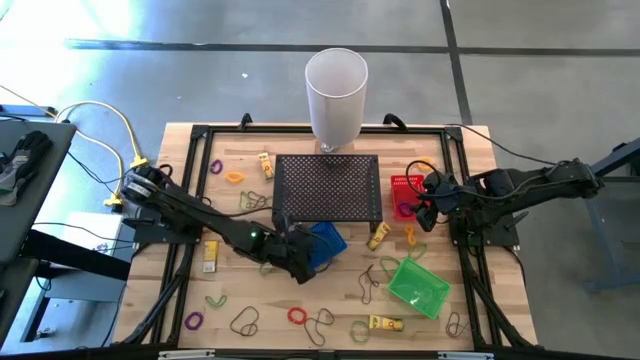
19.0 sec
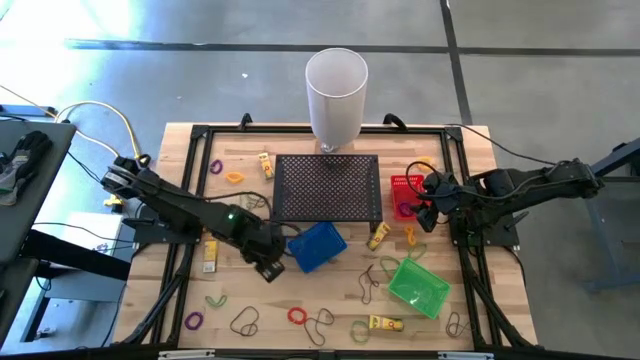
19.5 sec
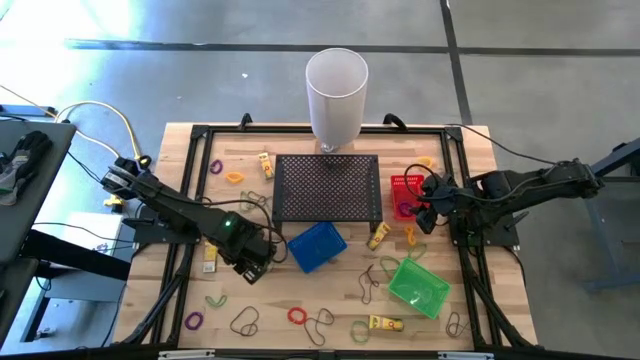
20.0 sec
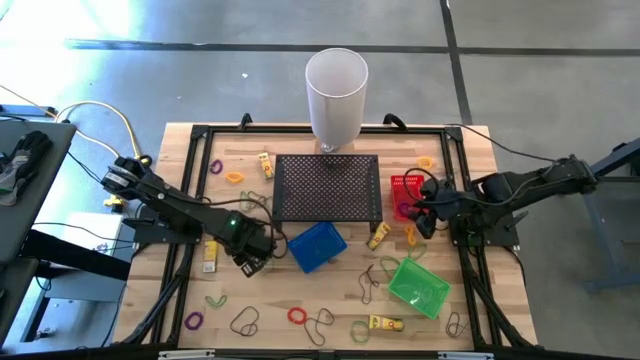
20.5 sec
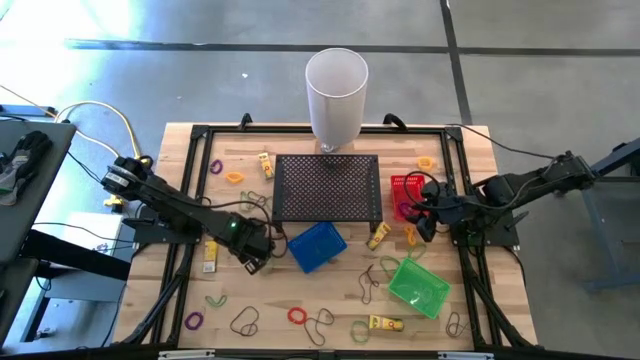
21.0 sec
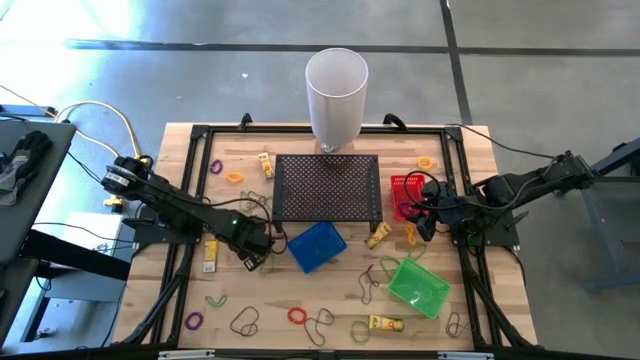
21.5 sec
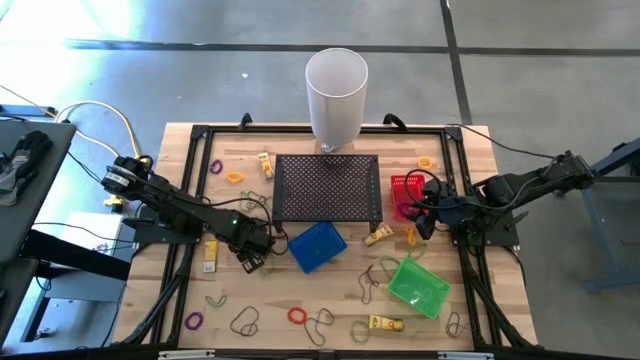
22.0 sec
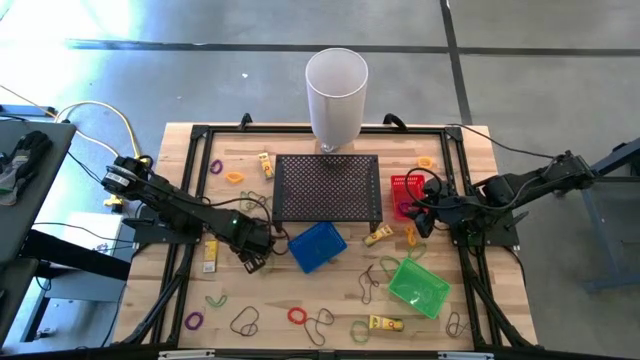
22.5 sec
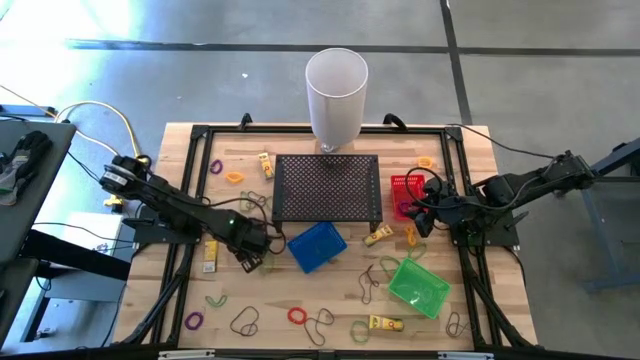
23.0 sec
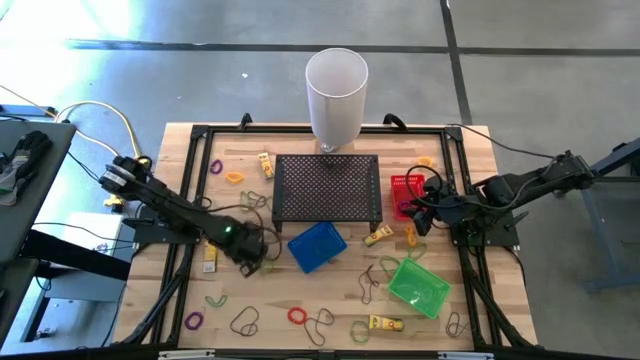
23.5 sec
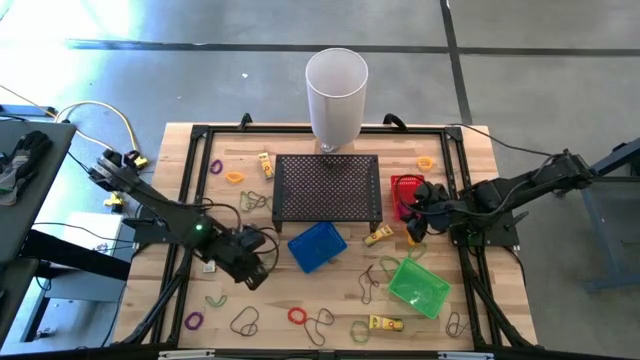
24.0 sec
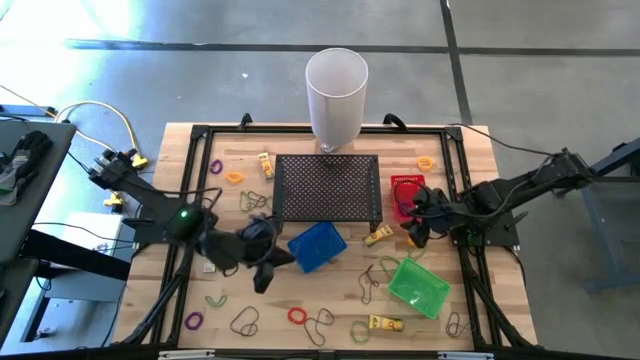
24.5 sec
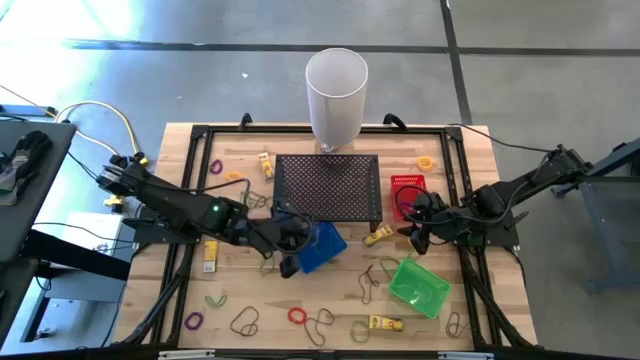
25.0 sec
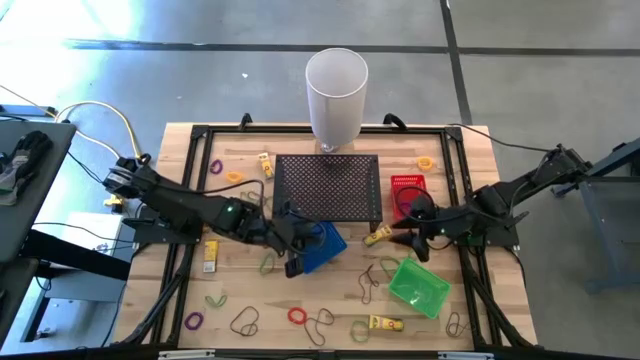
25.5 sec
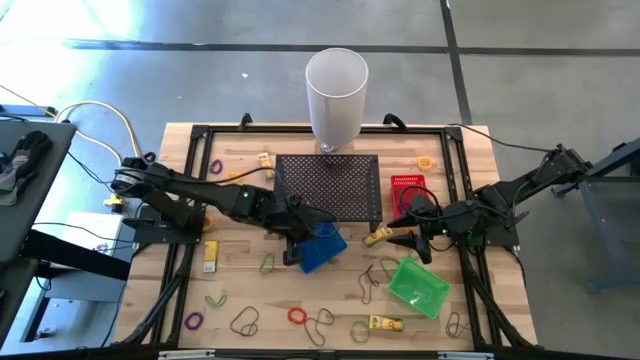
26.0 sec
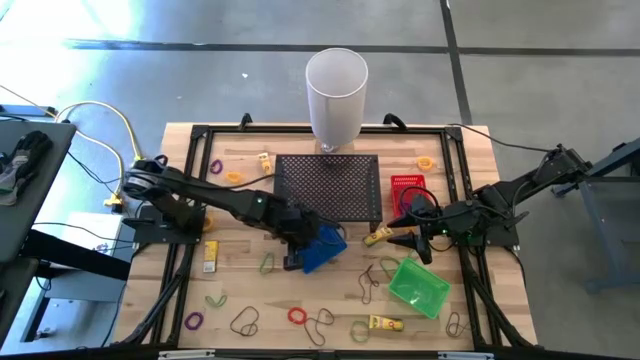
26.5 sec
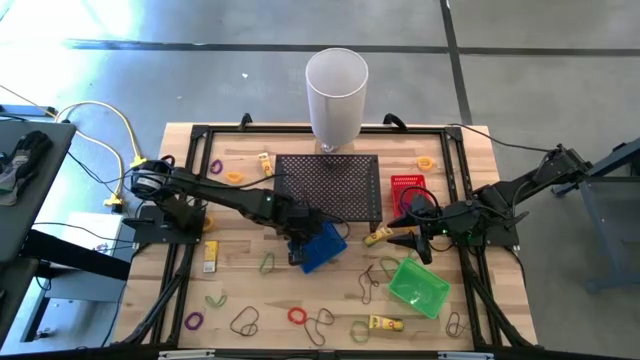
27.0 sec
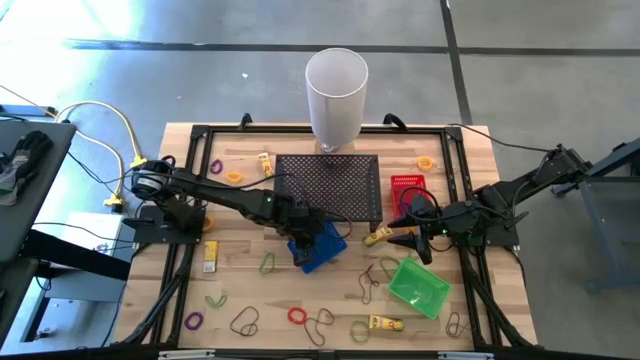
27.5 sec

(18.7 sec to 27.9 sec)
Task: Pick & Place Office Desk Supplies
Put the violet rubber band into the blue bin

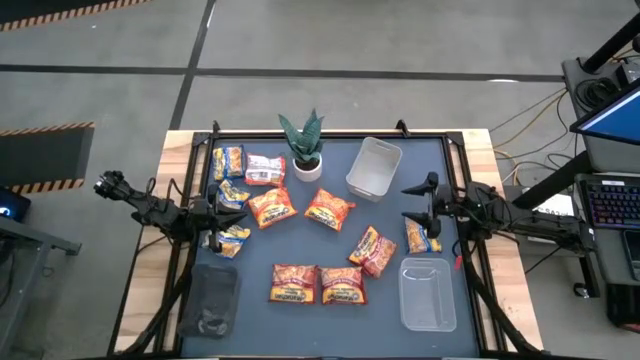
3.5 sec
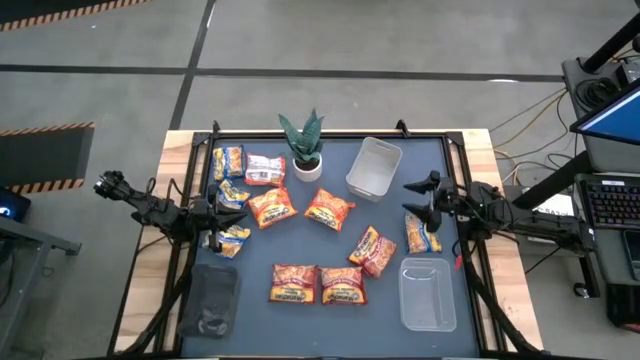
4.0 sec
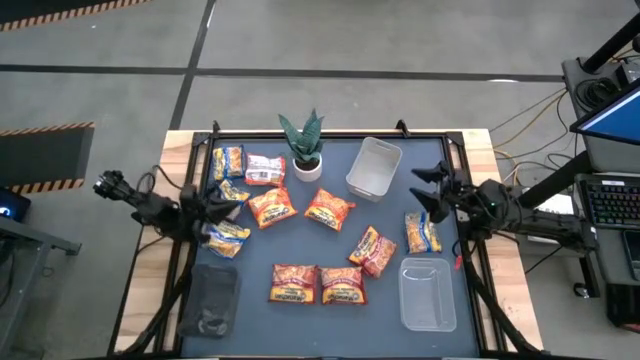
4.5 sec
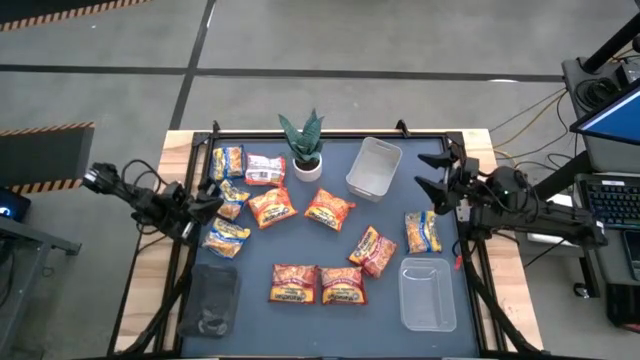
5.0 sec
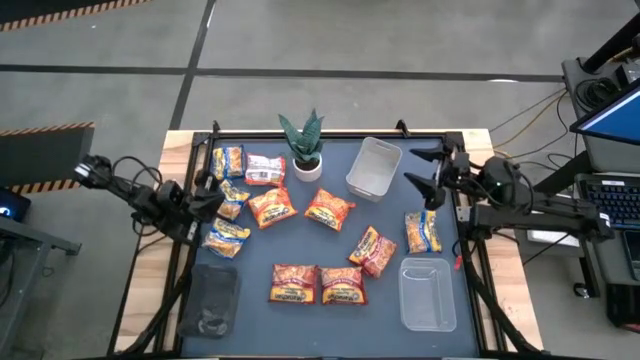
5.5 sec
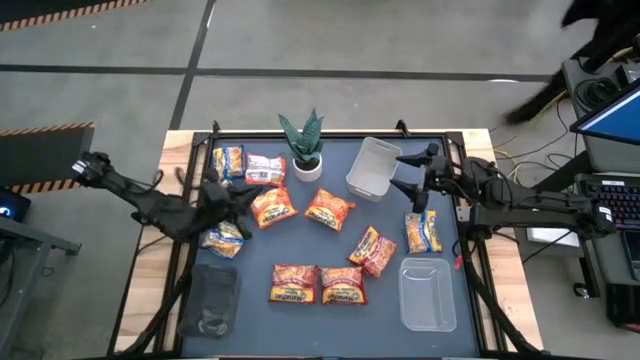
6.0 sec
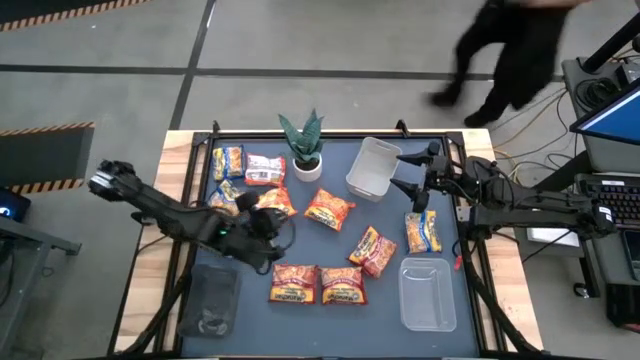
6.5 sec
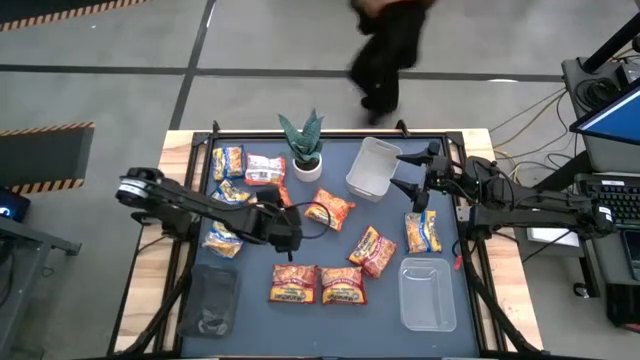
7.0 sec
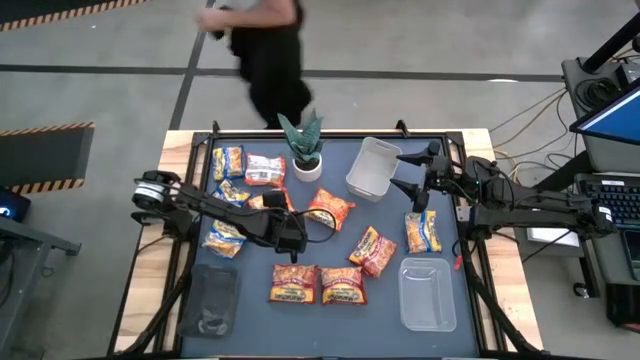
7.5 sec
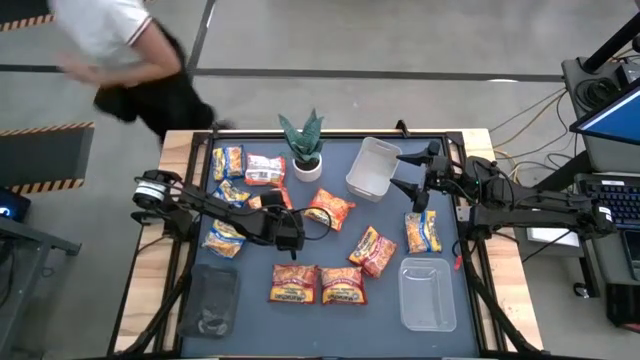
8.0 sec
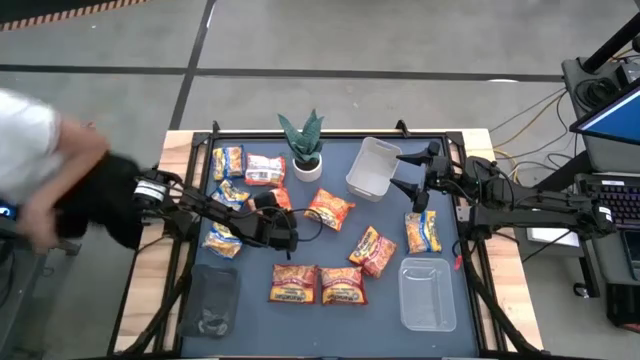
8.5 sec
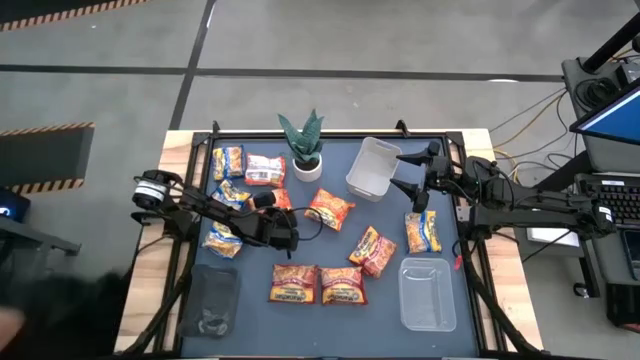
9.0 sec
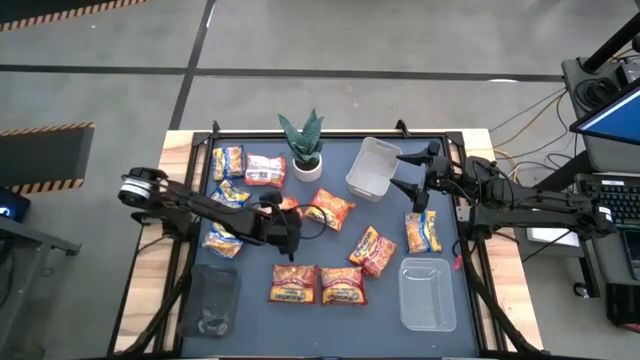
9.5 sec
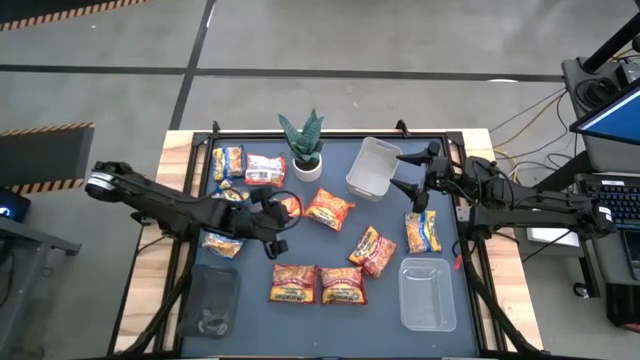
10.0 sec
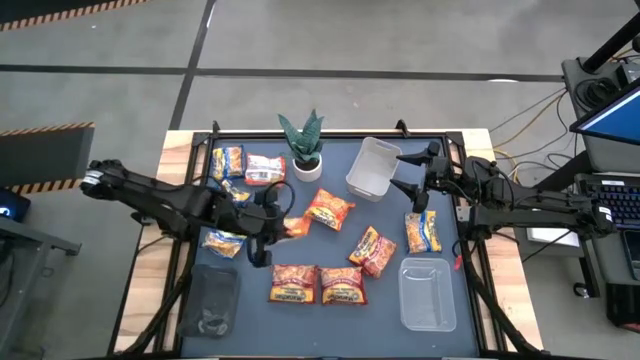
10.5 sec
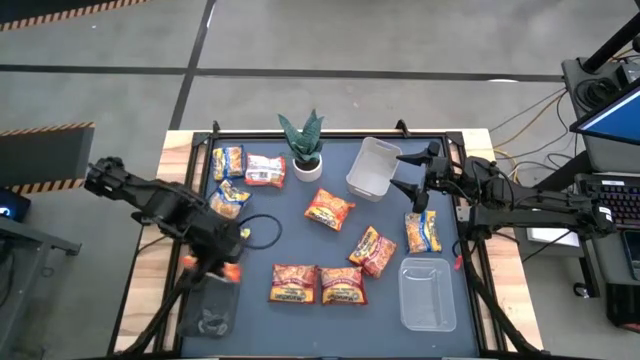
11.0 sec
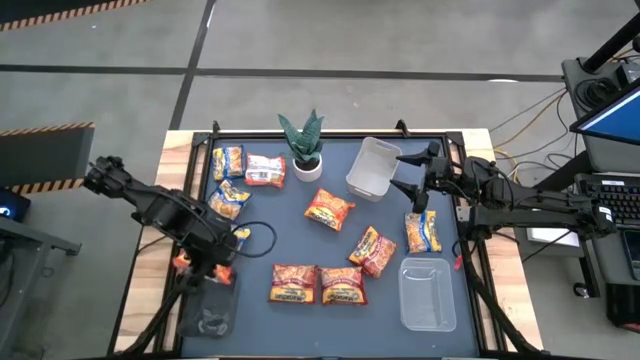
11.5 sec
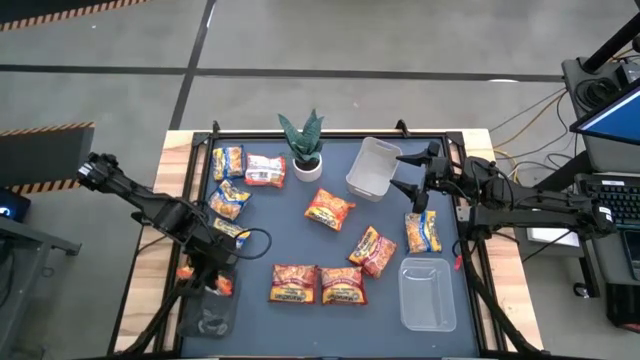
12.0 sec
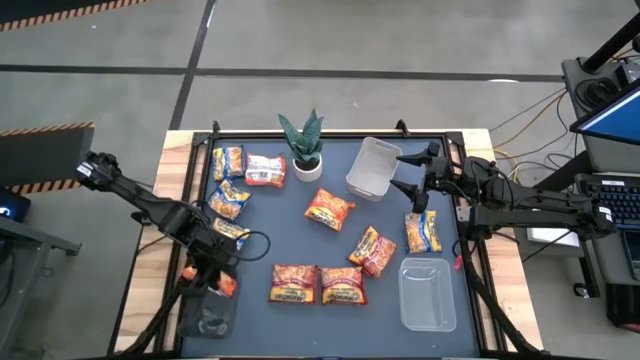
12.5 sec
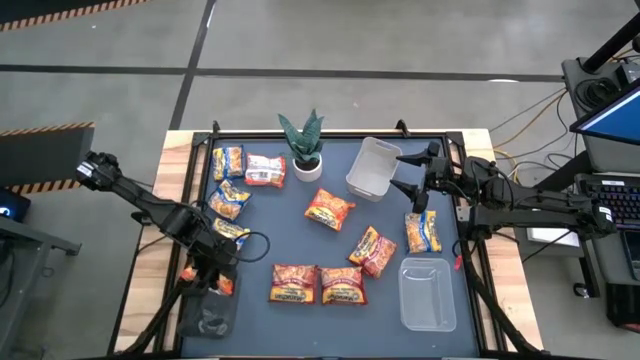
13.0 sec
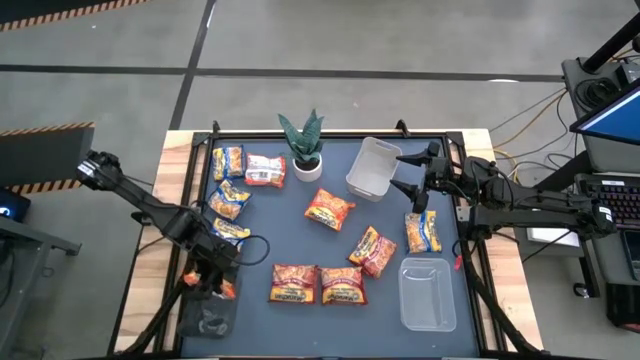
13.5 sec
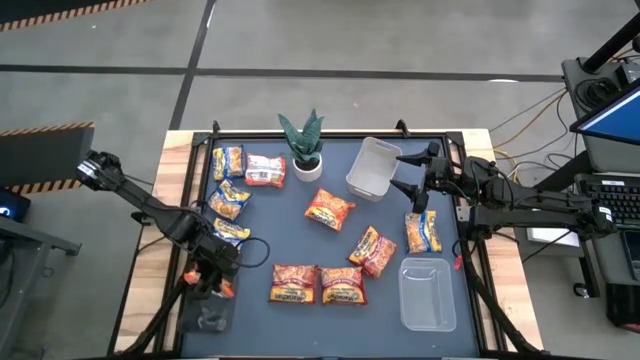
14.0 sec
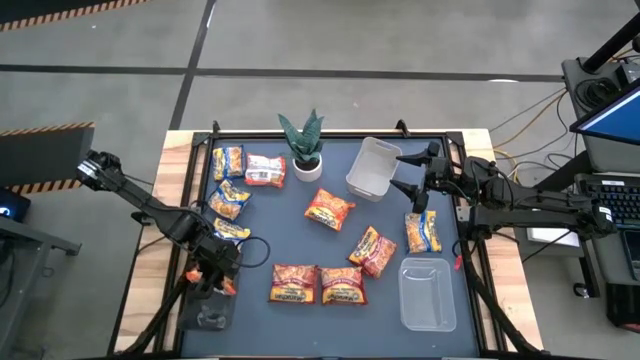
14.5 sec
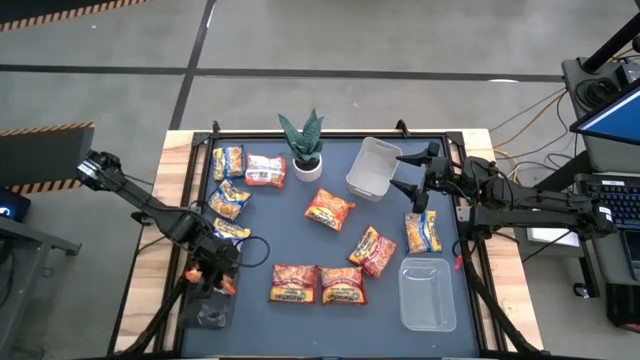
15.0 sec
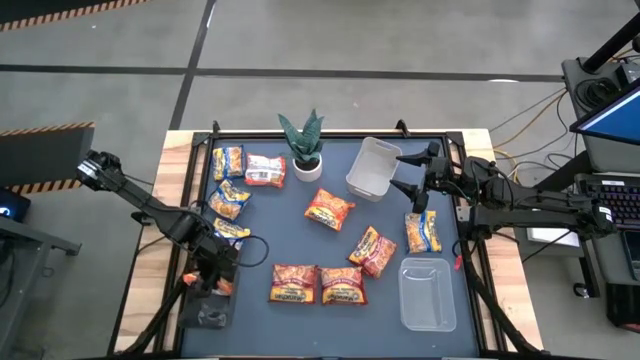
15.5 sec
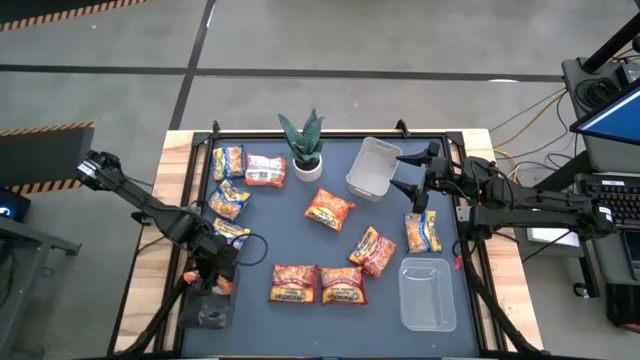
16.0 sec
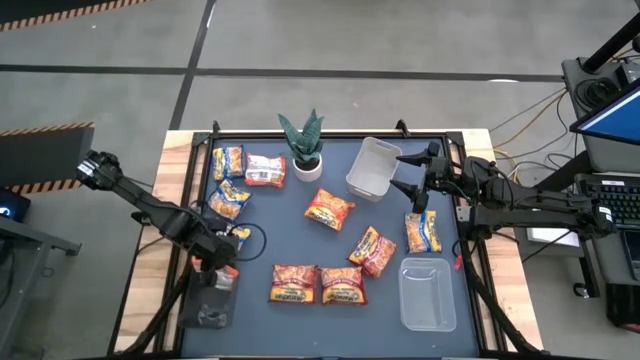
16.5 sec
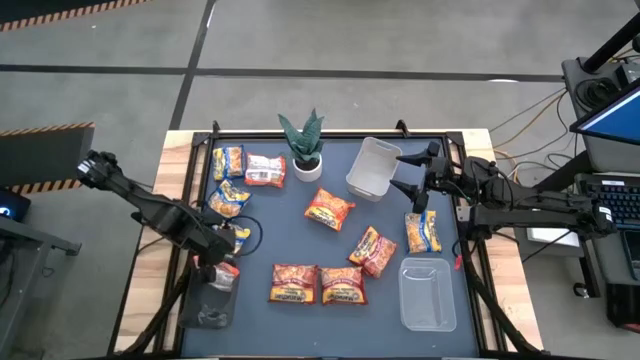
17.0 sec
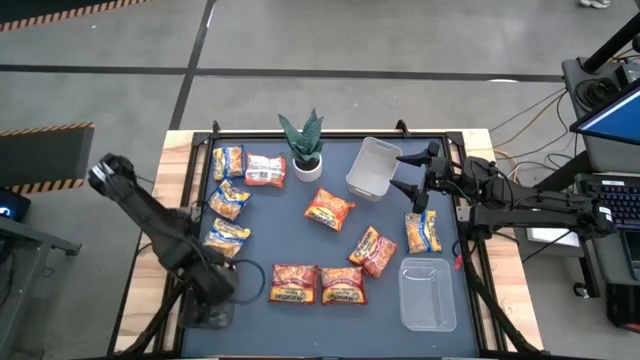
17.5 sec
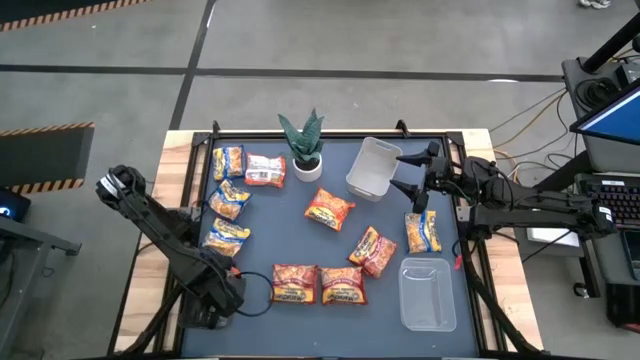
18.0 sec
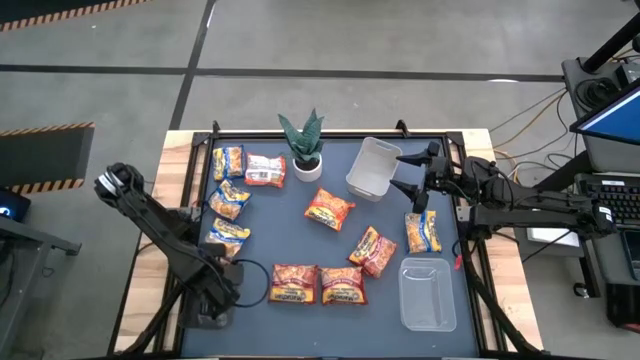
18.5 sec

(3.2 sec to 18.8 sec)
Task: Sort Maruchan noodles
Put the bottom left orange instant noodle pack into the black bin
